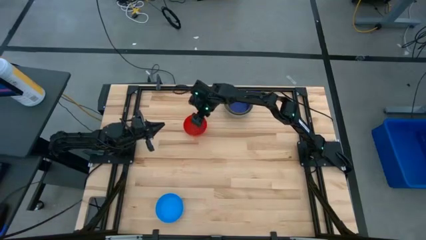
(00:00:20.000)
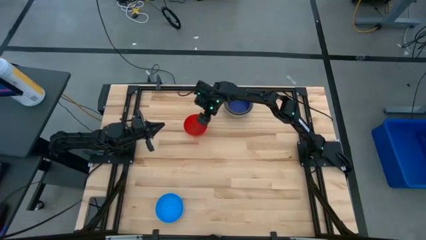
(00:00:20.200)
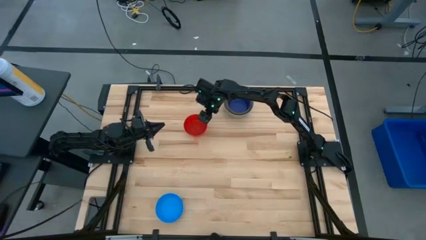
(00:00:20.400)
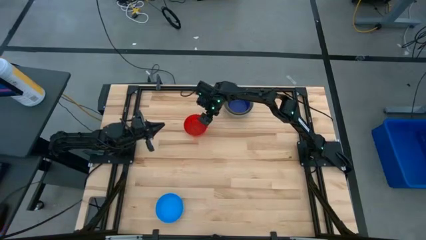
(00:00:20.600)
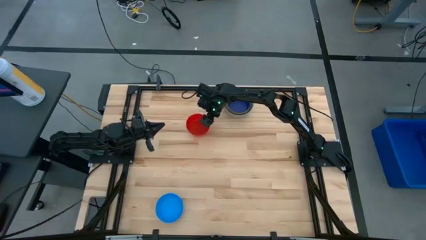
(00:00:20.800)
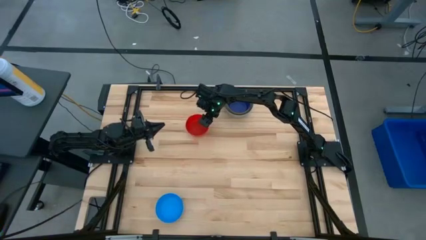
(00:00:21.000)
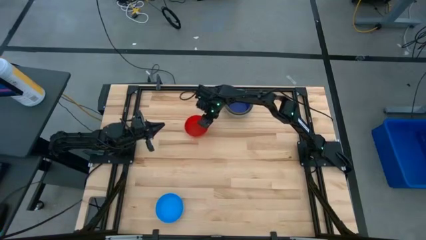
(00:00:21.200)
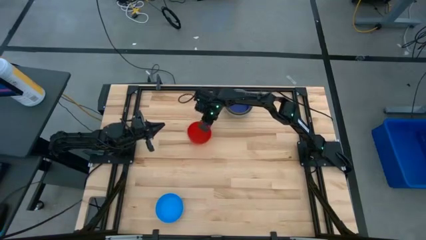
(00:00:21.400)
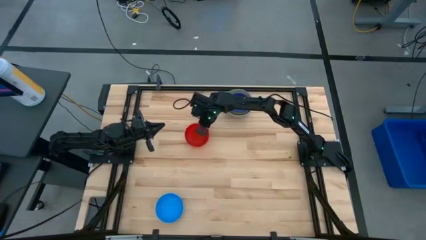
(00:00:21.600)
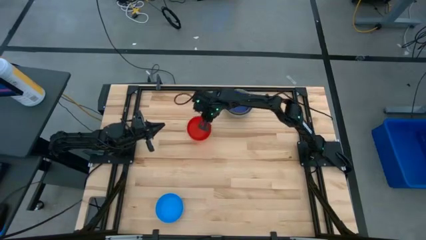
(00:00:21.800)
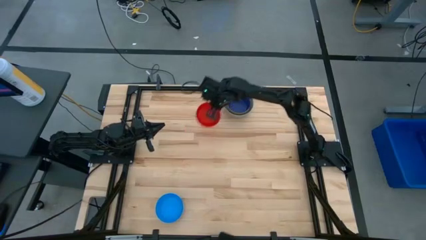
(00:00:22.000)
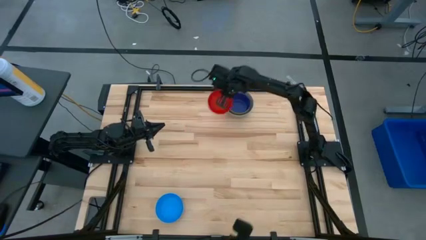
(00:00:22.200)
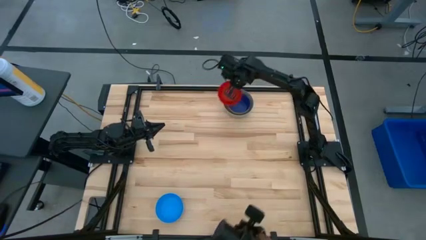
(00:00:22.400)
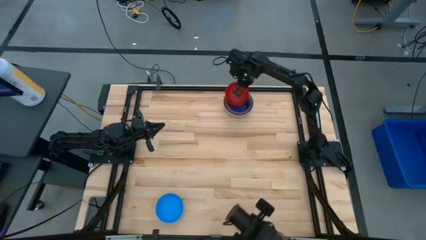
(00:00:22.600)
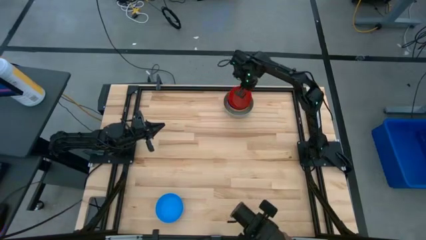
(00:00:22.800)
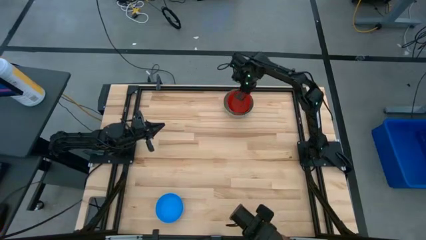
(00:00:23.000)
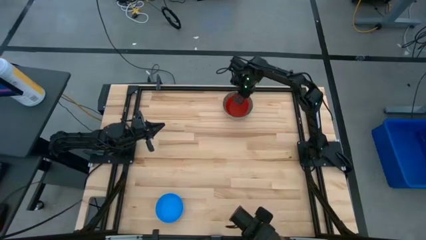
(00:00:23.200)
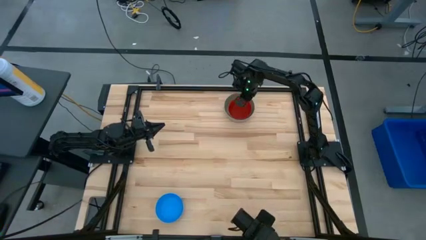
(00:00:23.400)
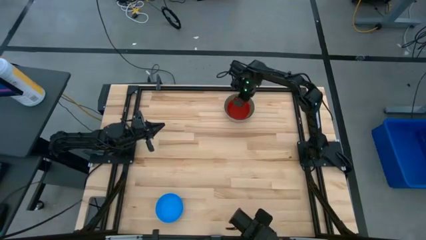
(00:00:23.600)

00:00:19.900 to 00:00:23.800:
Stack the red bowl on the dark blue bowl

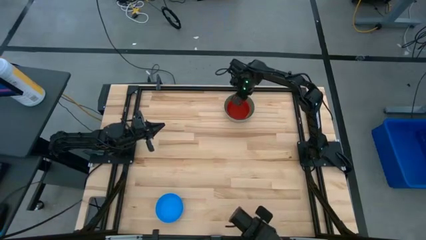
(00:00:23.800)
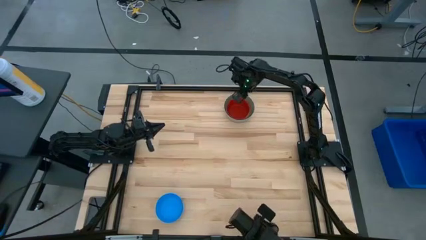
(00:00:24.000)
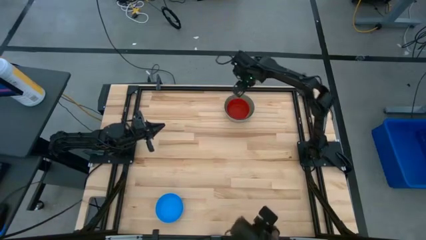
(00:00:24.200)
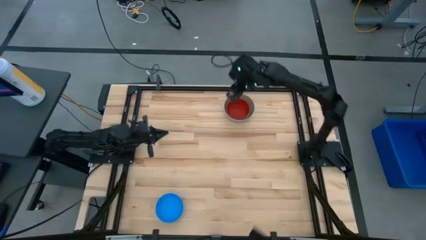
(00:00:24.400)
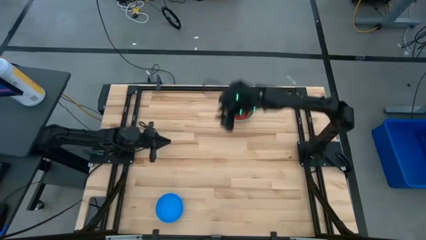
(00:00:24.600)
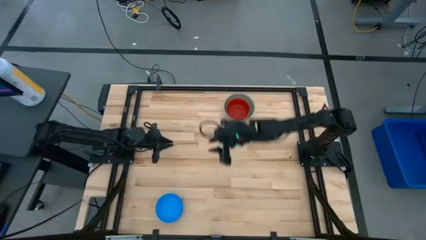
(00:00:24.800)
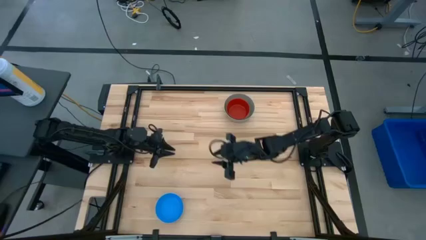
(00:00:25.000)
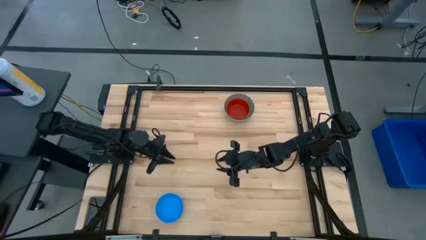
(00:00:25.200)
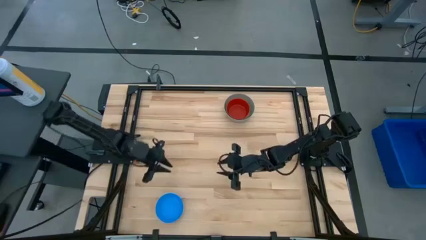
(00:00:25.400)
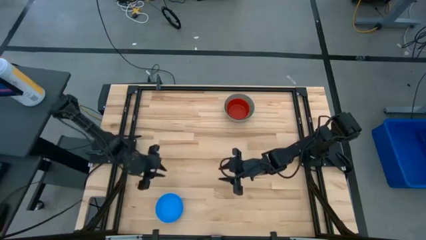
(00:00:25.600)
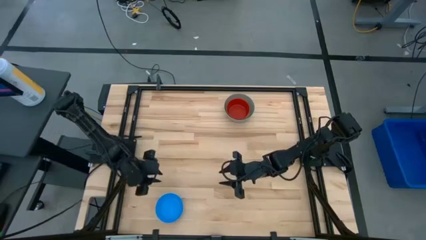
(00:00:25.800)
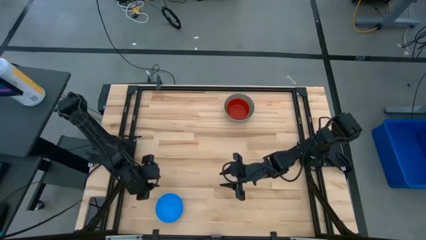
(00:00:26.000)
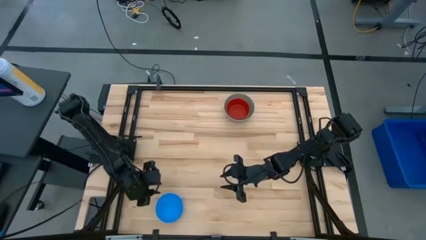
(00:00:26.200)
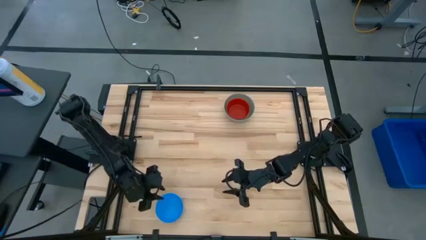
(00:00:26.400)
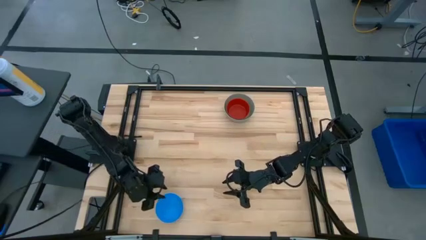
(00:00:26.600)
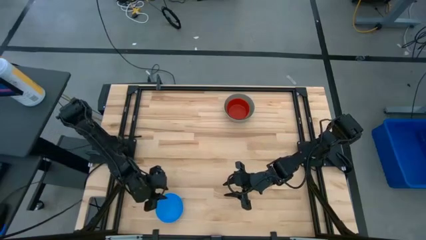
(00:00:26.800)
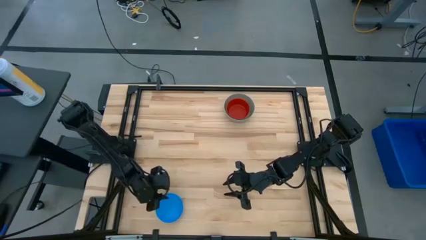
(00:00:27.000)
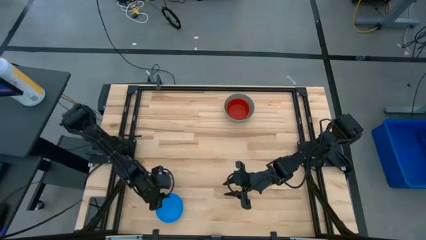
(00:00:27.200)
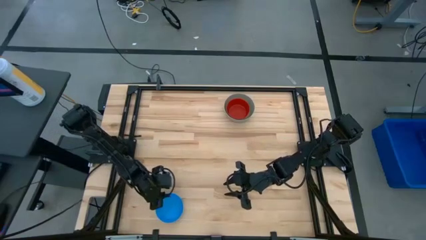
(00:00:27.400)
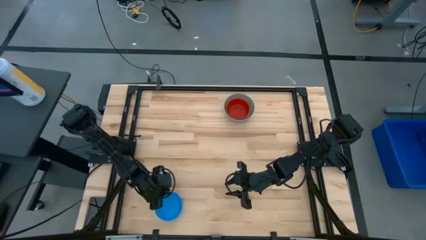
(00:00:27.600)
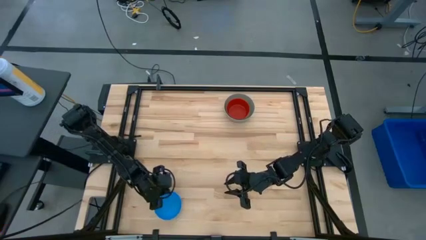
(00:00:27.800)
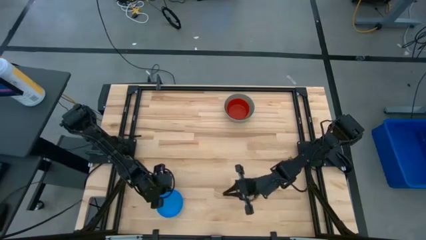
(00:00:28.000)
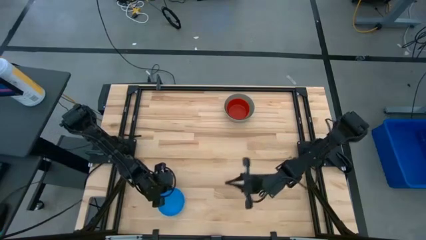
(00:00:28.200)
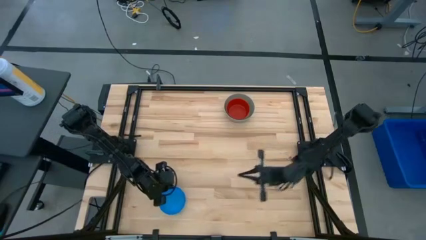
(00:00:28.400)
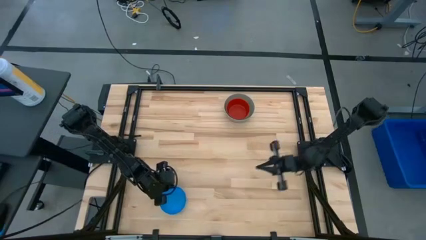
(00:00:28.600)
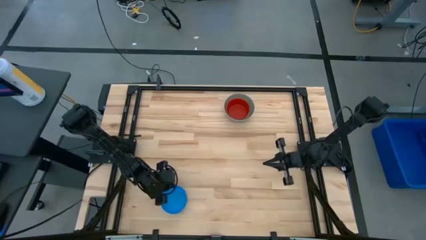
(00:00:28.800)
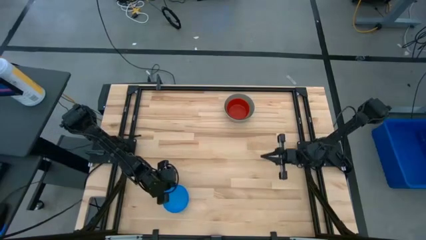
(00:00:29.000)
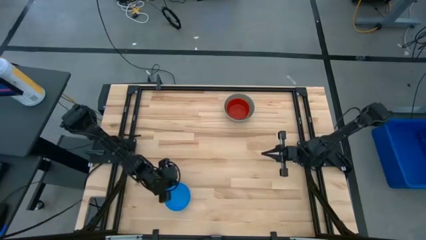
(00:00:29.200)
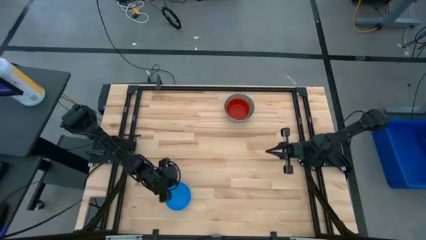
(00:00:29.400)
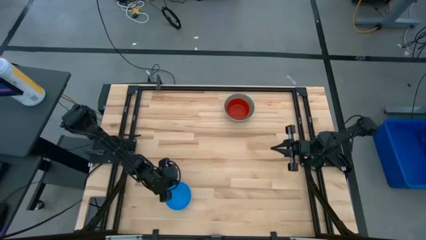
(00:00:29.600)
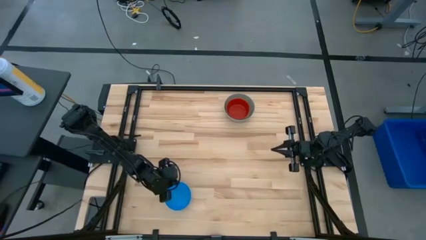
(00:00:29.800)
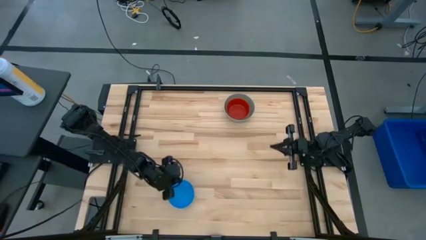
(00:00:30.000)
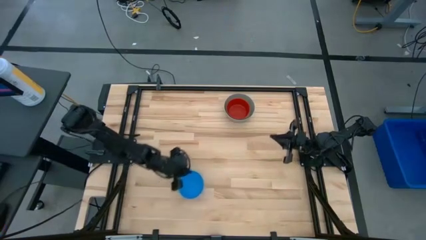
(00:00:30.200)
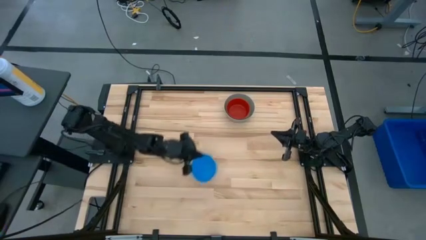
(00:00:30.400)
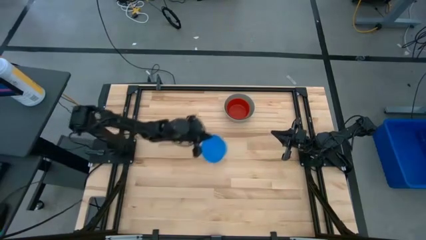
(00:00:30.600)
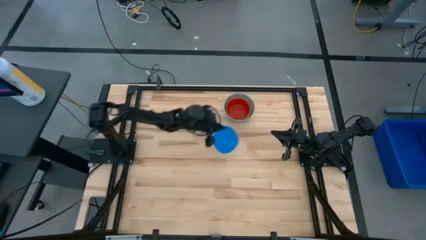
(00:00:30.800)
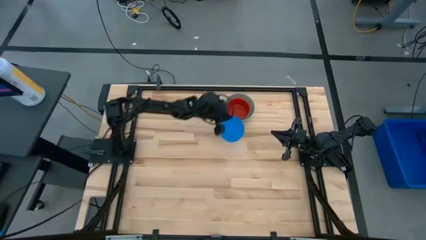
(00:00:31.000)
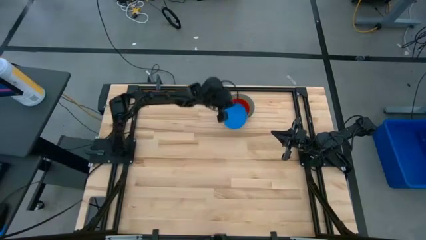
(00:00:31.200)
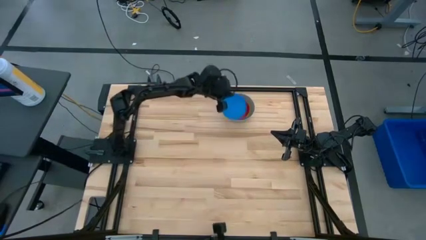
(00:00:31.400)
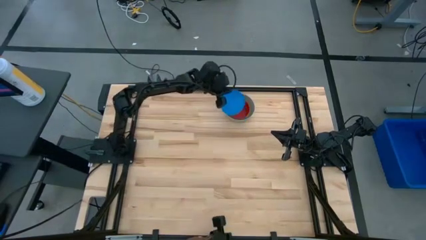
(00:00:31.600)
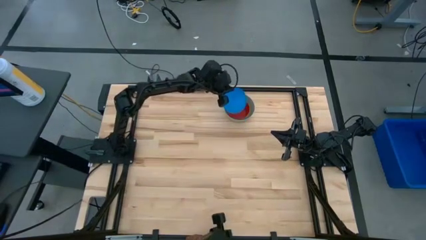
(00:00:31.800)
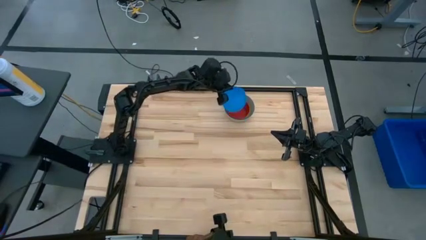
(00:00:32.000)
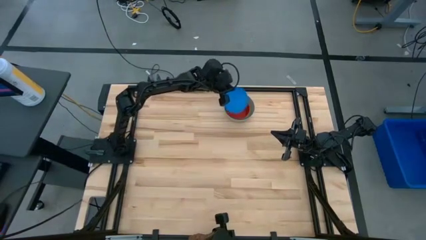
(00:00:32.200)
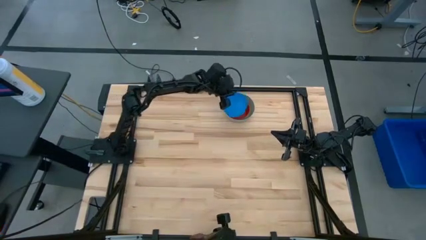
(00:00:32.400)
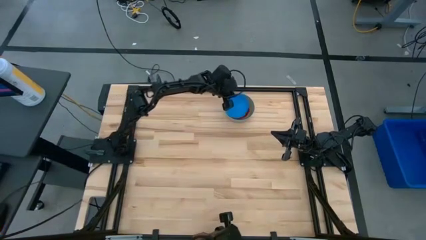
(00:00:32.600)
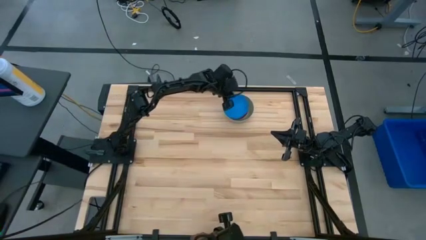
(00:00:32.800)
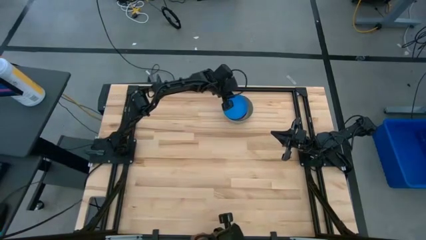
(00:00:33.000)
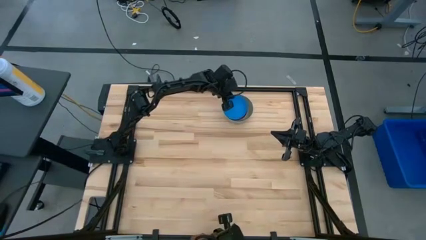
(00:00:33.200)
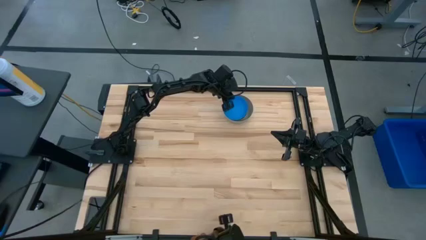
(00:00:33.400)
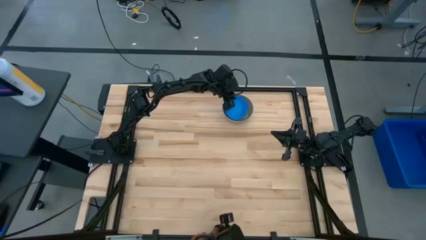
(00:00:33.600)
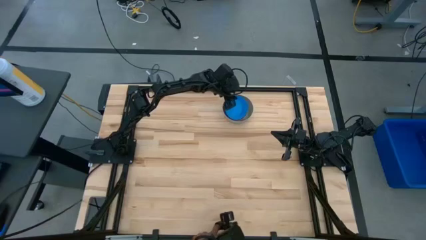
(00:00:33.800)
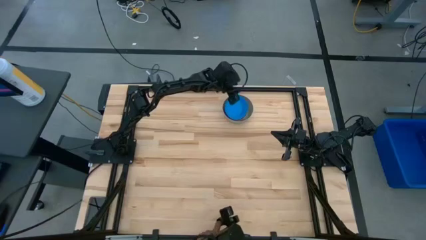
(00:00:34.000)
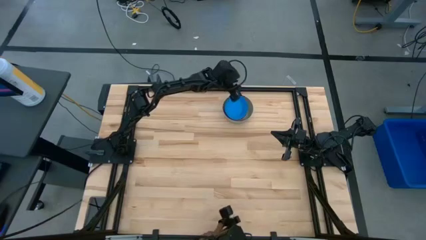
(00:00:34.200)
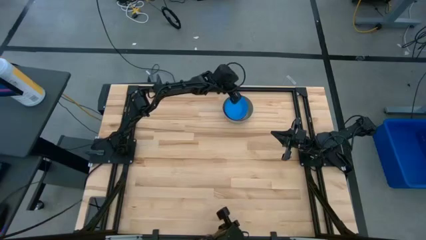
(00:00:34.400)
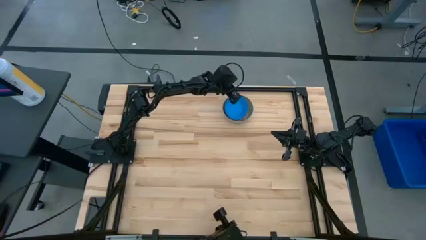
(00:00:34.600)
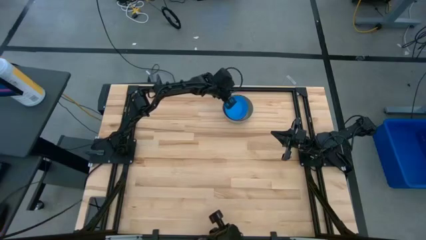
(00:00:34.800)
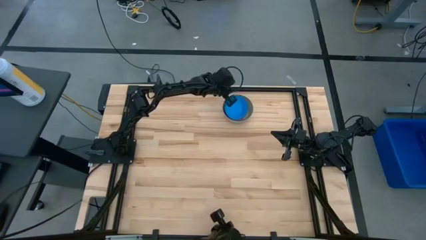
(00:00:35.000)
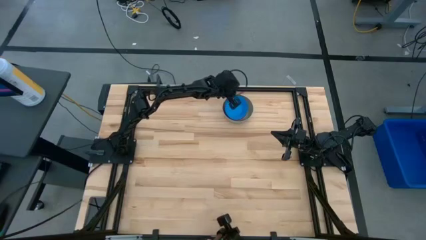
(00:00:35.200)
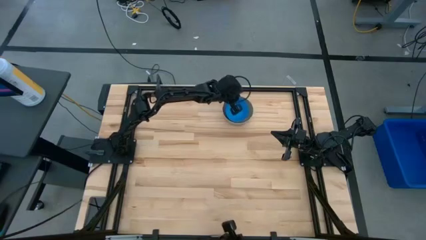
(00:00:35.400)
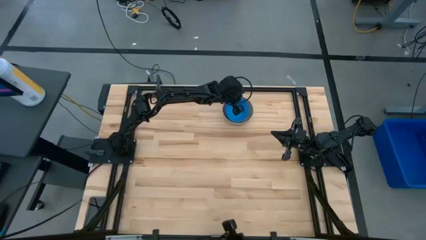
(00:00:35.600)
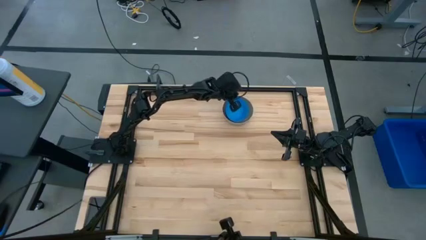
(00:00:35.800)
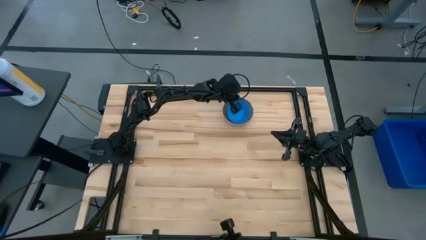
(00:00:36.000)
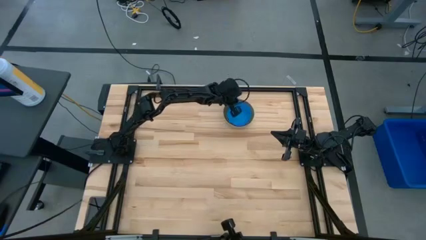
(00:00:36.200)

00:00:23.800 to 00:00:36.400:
Stack the blue bowl on the red bowl
